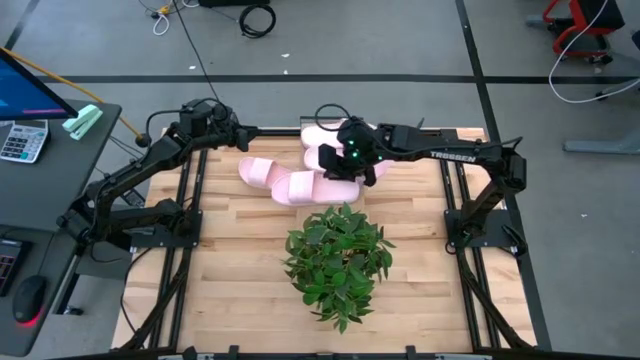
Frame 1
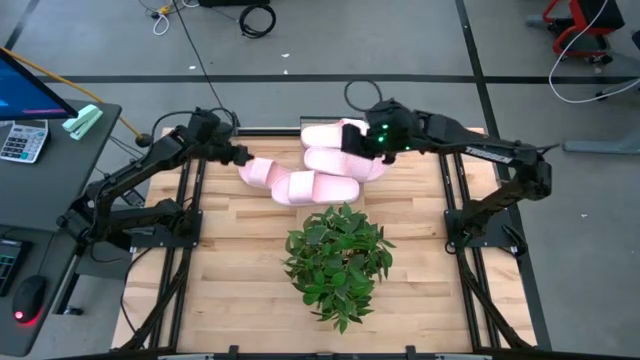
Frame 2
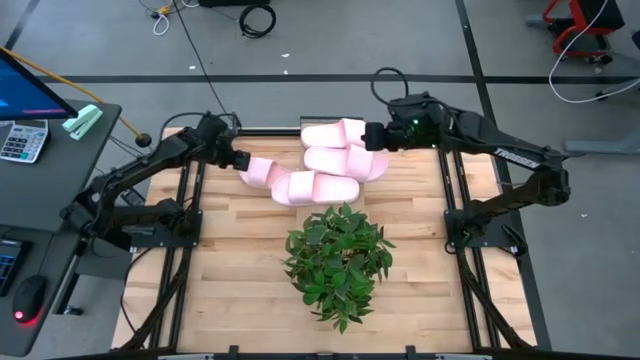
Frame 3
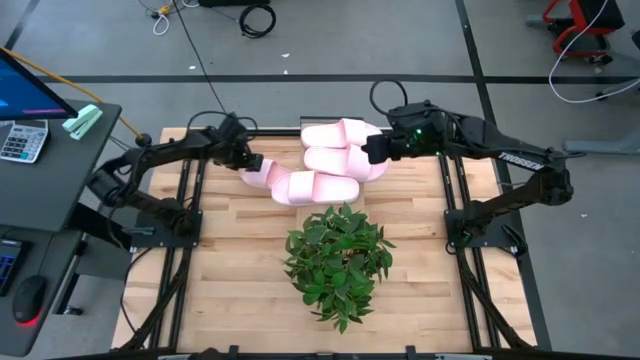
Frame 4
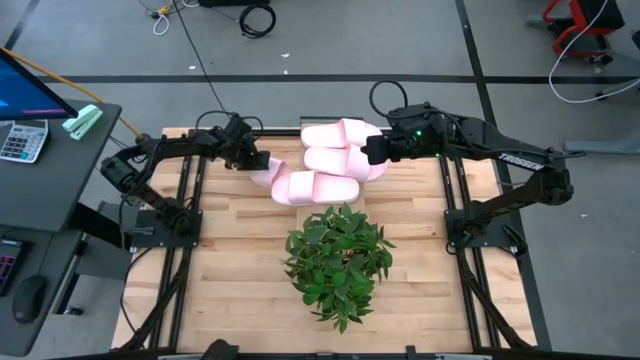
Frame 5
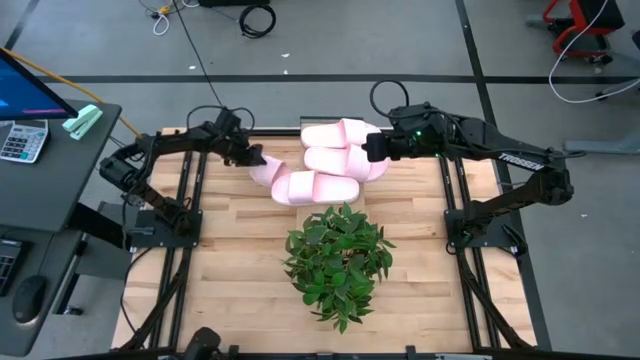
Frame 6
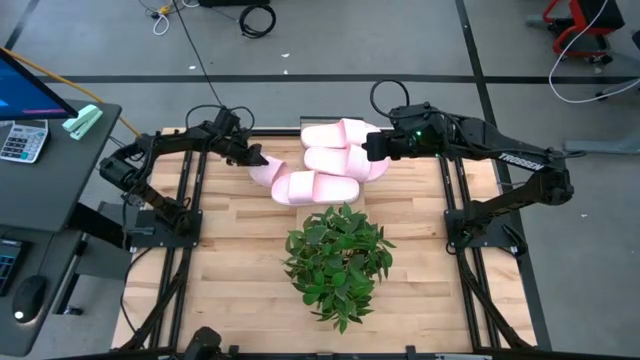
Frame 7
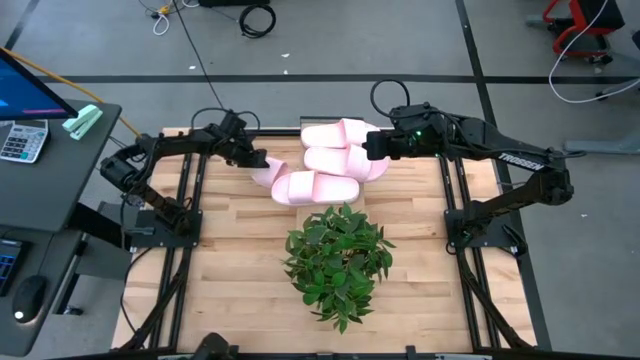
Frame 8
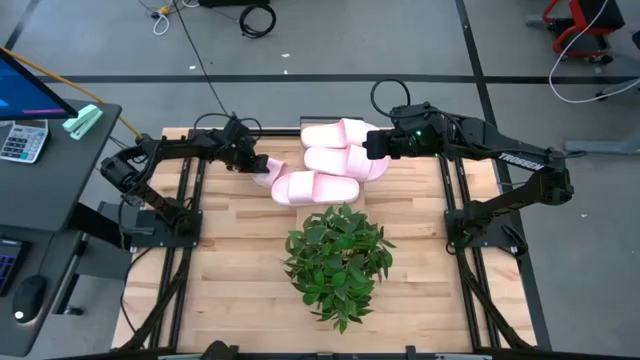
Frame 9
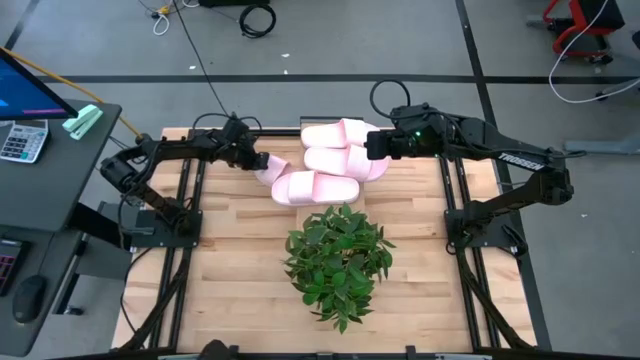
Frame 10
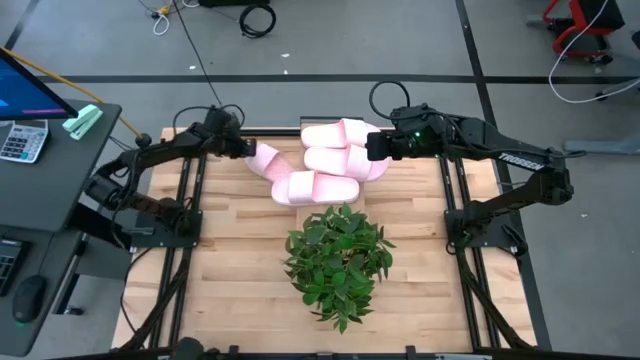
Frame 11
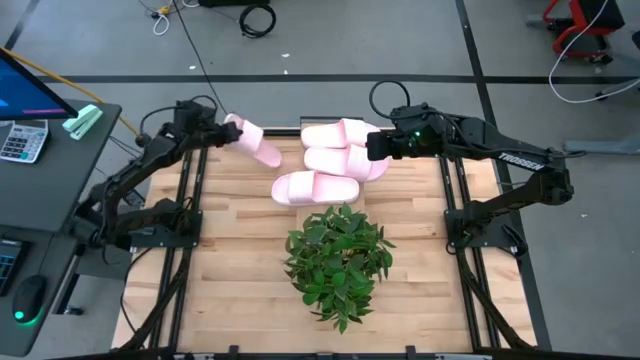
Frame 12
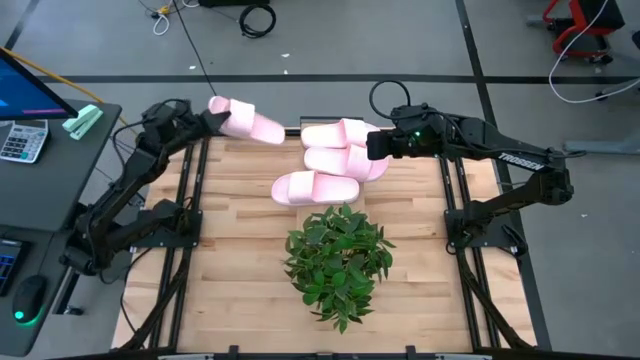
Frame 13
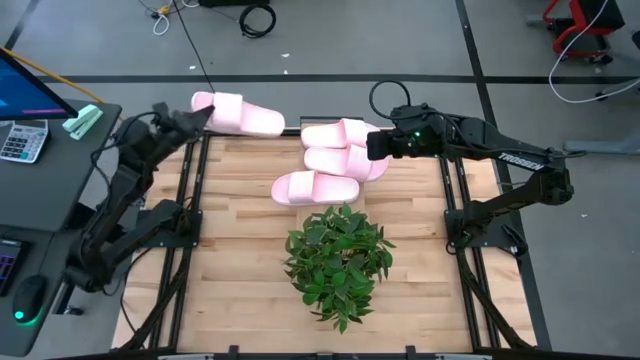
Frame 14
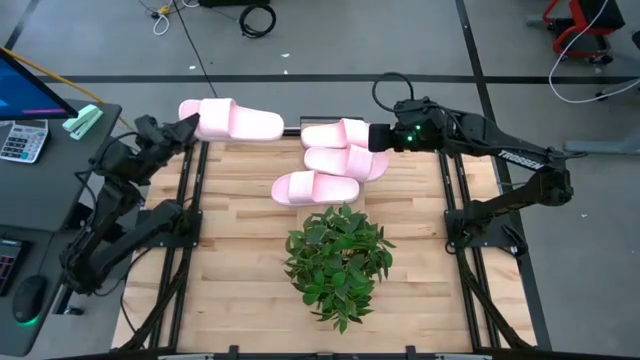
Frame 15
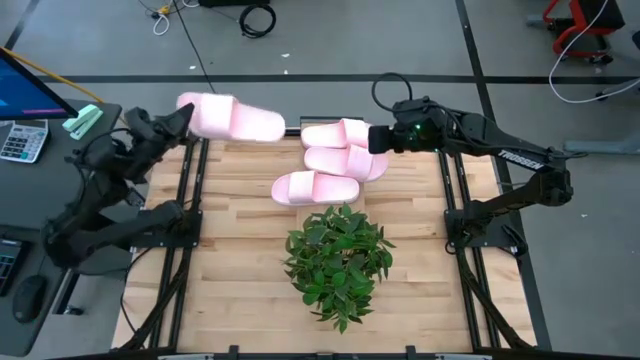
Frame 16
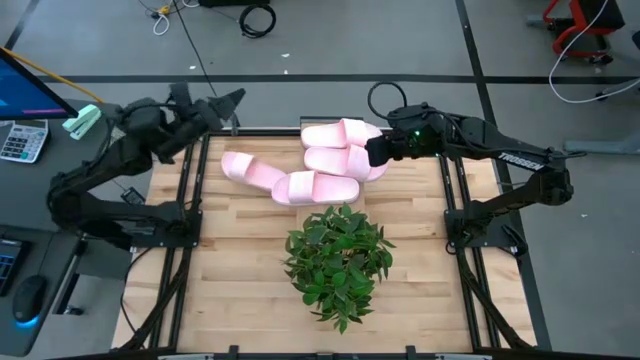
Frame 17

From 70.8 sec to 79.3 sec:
Task: Pick and place slides into the shelf
Put the pink slide on the shelf

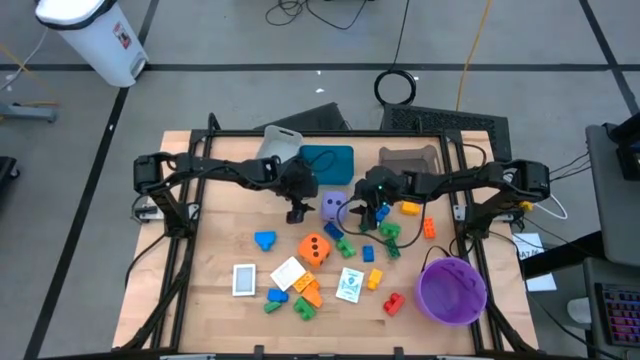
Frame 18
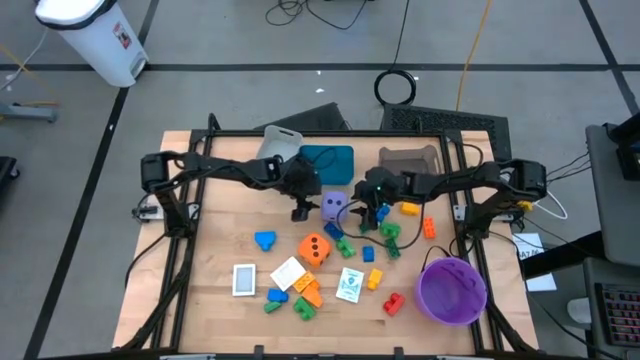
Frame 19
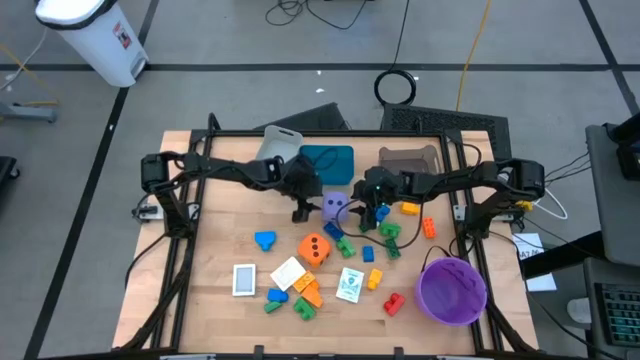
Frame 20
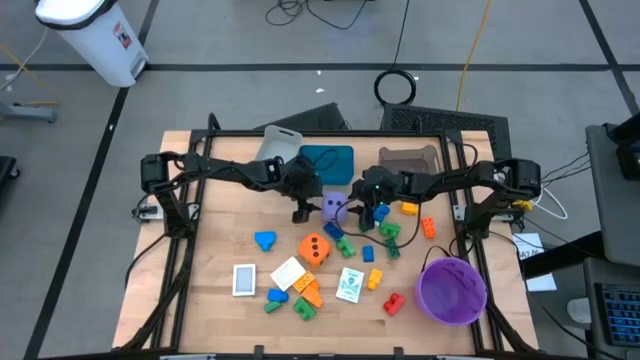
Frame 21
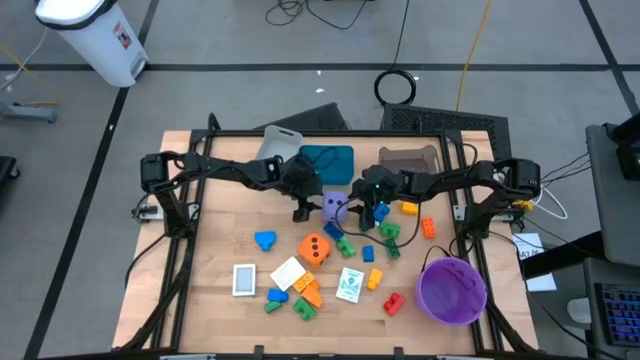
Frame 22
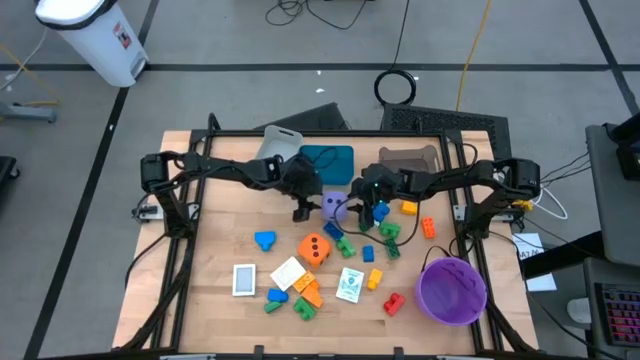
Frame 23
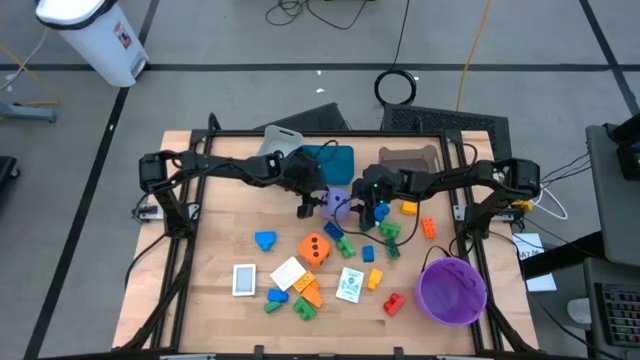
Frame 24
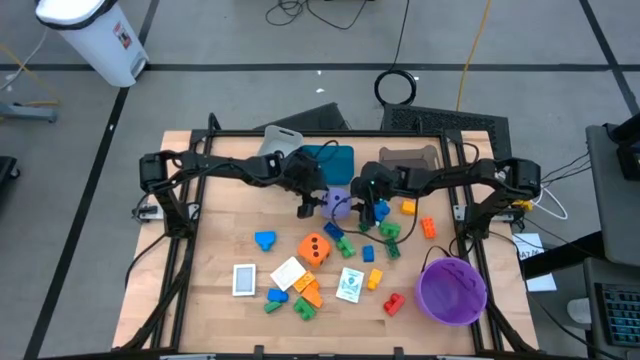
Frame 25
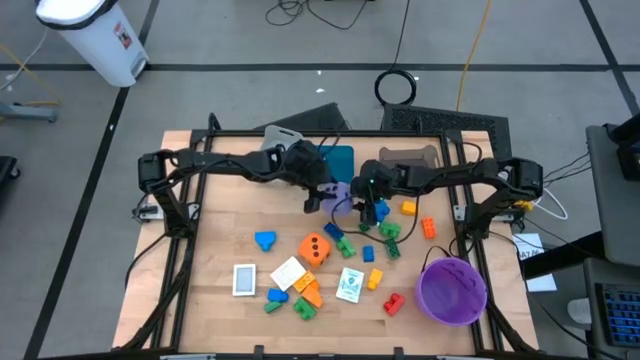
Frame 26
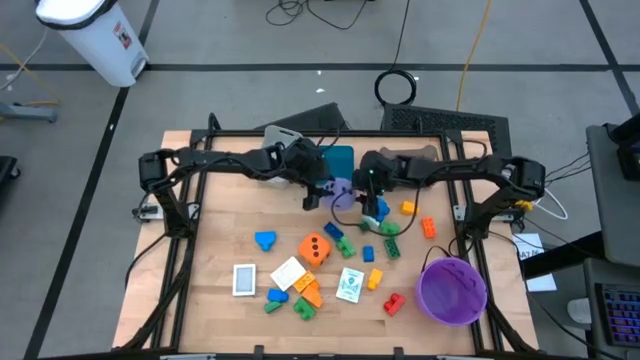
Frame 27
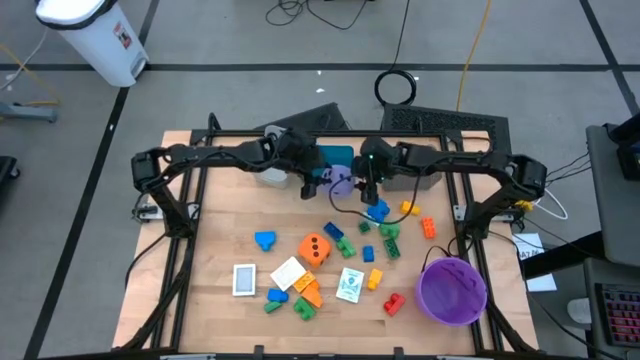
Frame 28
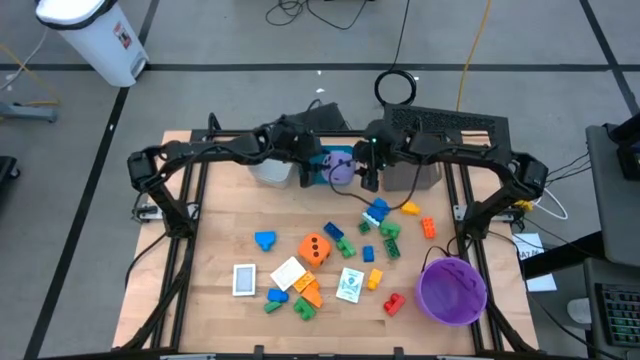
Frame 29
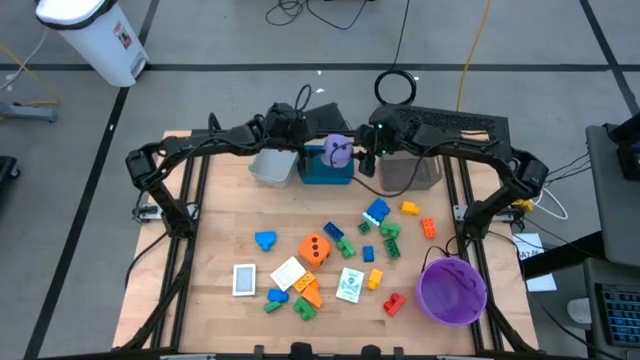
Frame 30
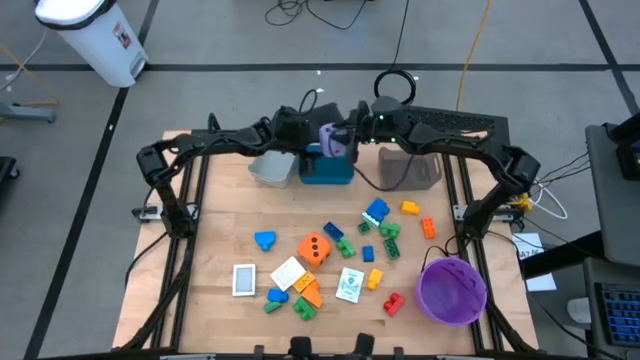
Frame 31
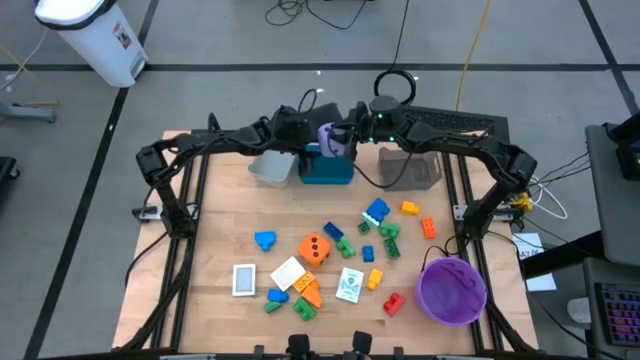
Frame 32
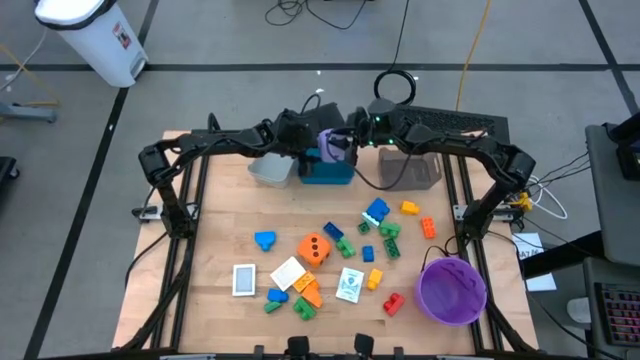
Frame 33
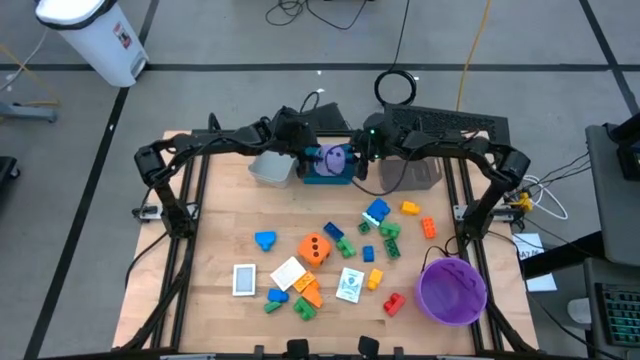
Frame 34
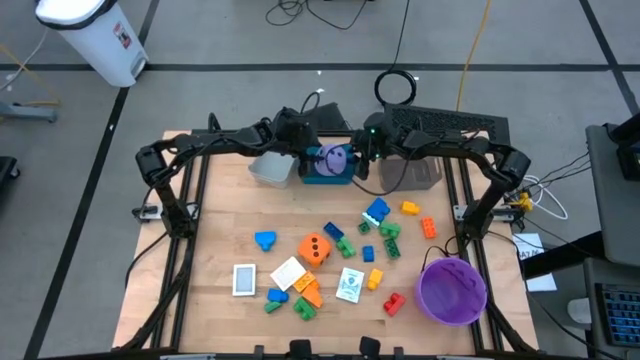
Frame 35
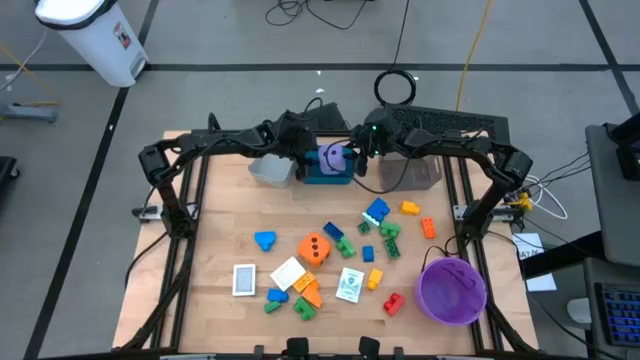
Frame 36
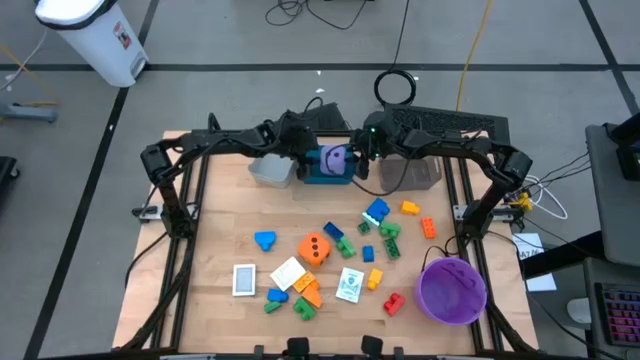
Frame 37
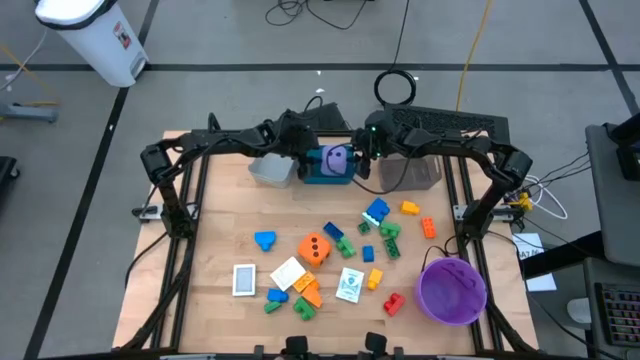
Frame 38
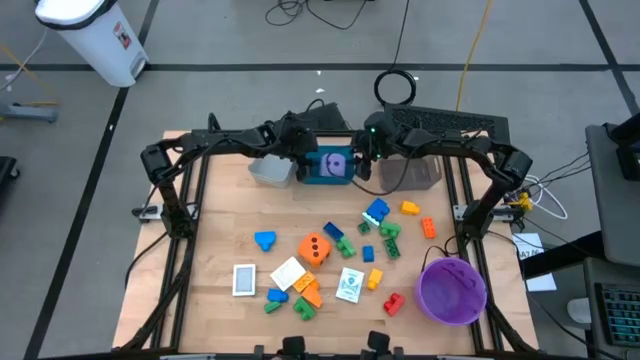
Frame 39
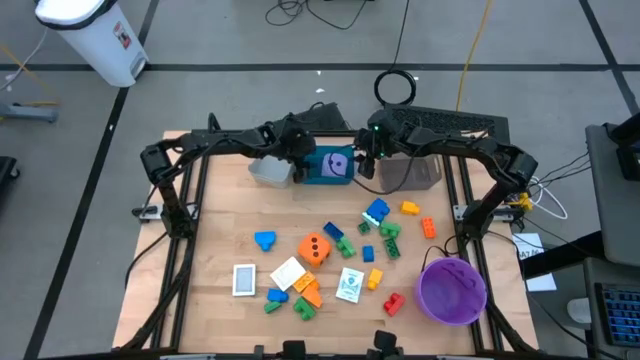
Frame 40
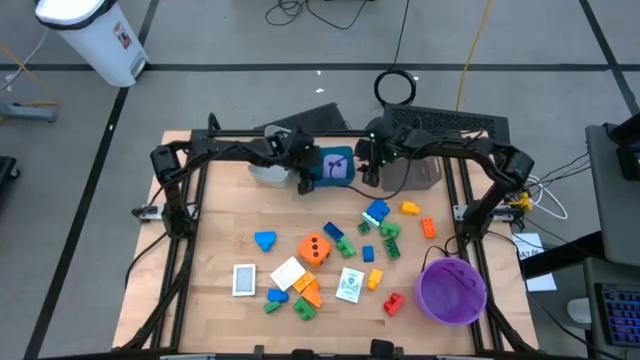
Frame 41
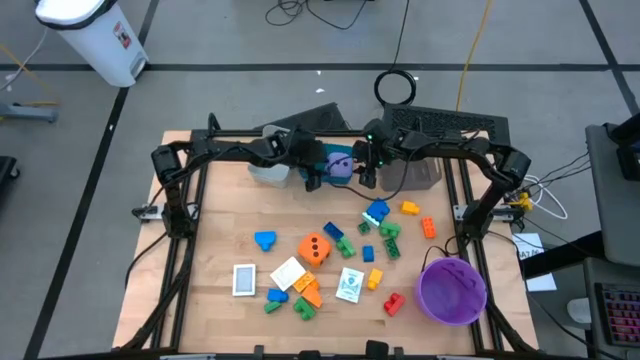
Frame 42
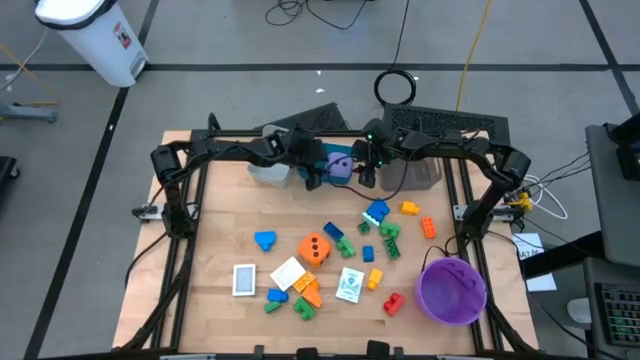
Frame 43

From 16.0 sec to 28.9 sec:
Task: Pick & Place Toys
Put the purple dice into the blue bin
